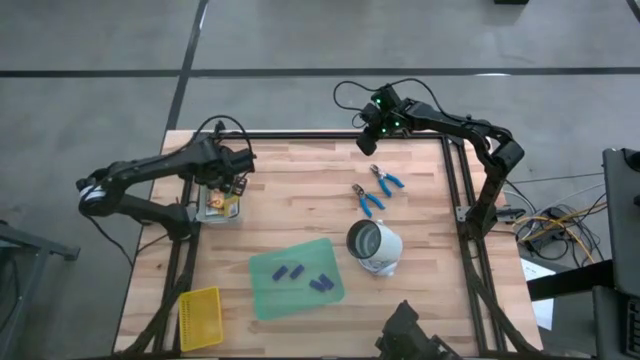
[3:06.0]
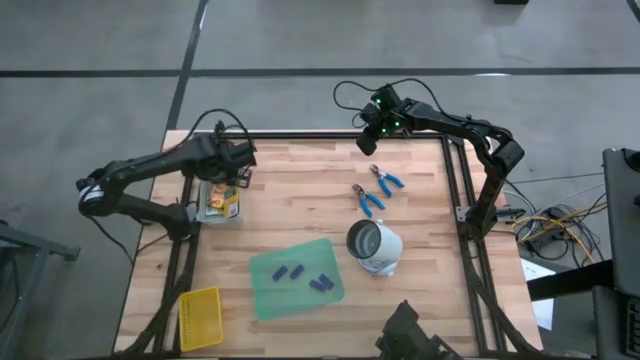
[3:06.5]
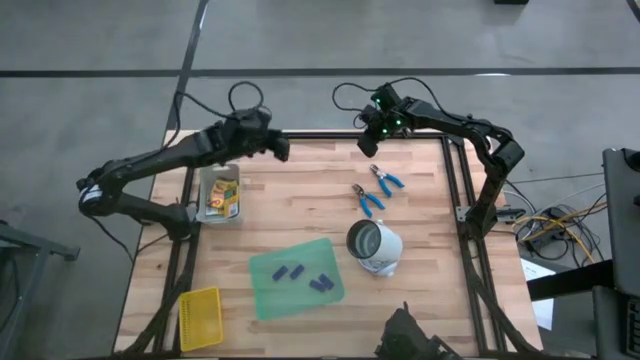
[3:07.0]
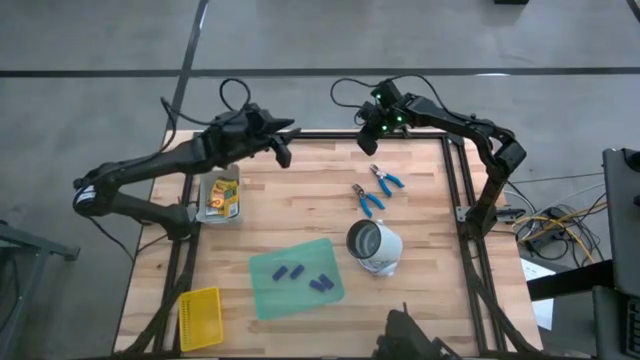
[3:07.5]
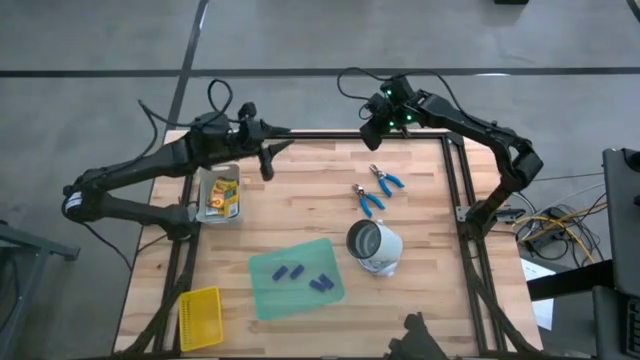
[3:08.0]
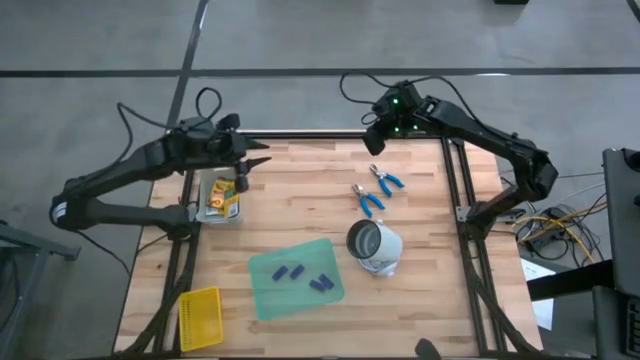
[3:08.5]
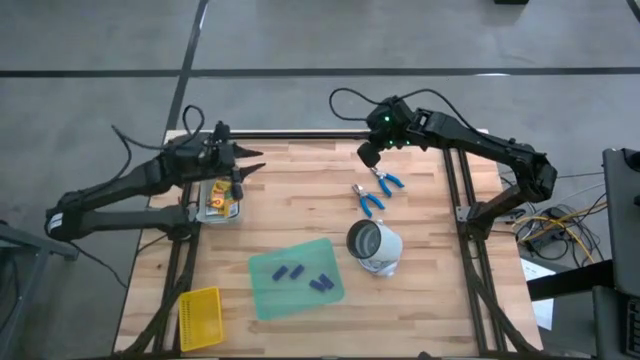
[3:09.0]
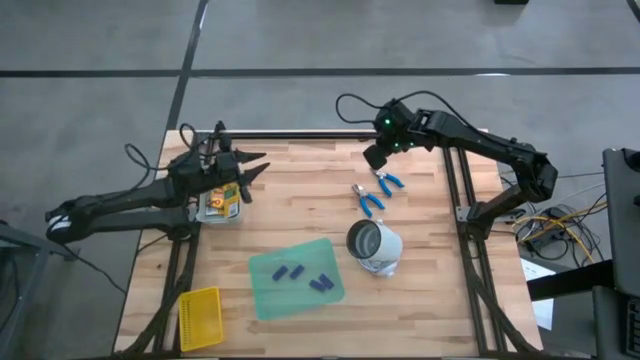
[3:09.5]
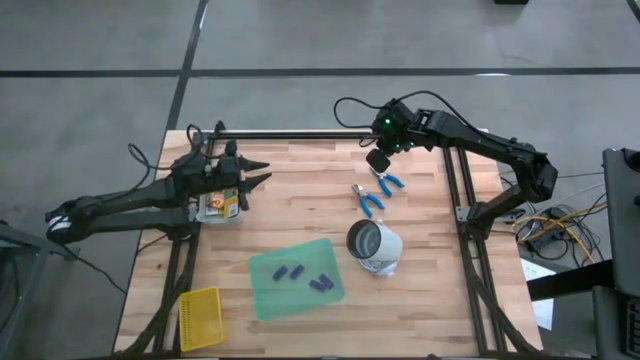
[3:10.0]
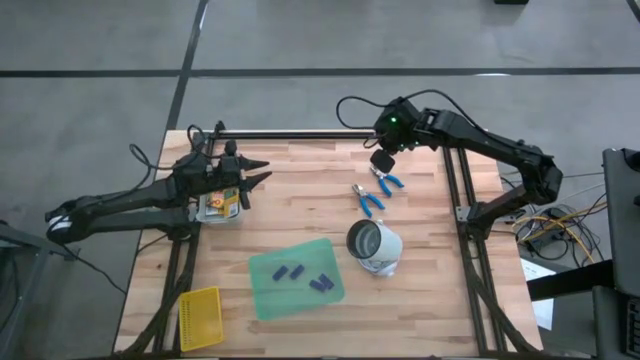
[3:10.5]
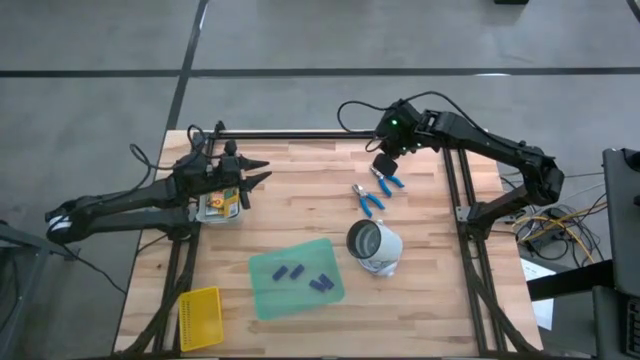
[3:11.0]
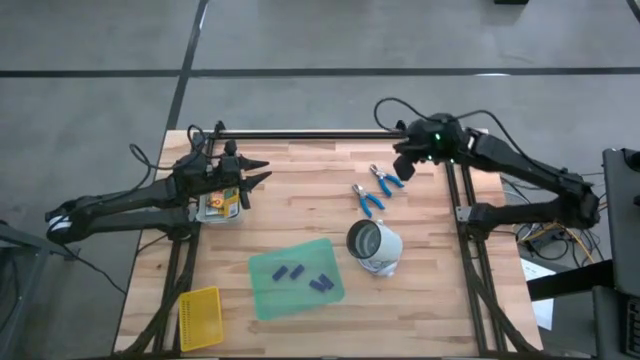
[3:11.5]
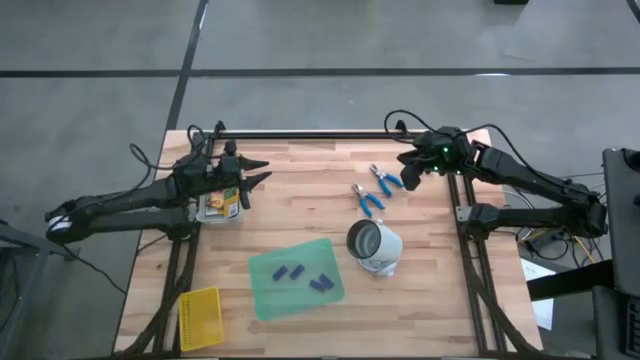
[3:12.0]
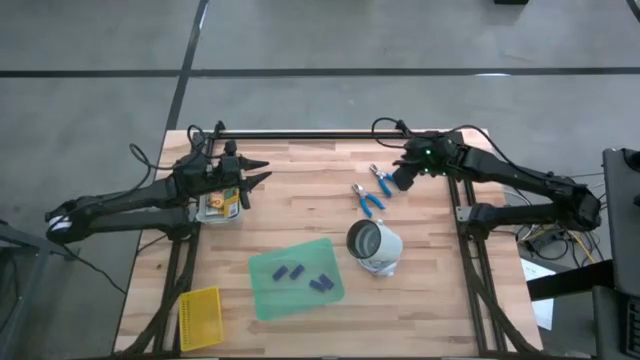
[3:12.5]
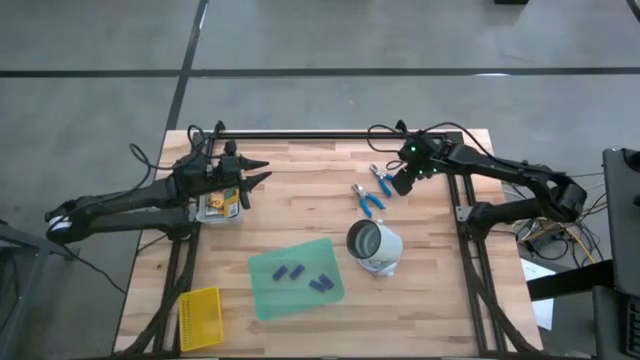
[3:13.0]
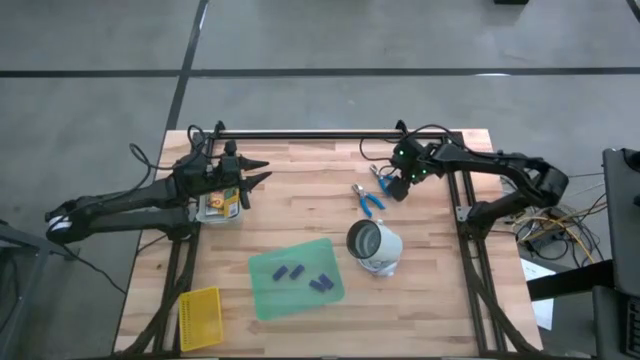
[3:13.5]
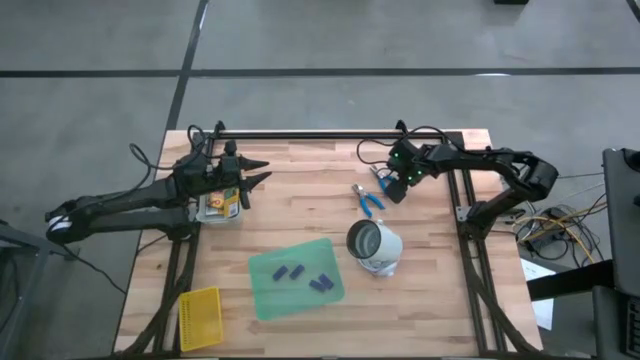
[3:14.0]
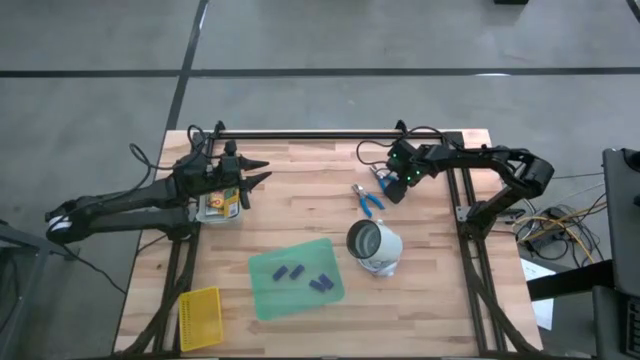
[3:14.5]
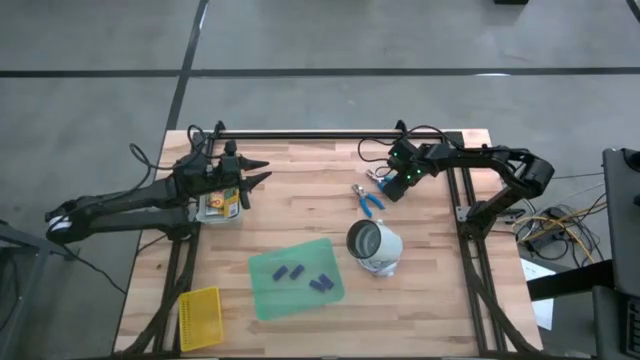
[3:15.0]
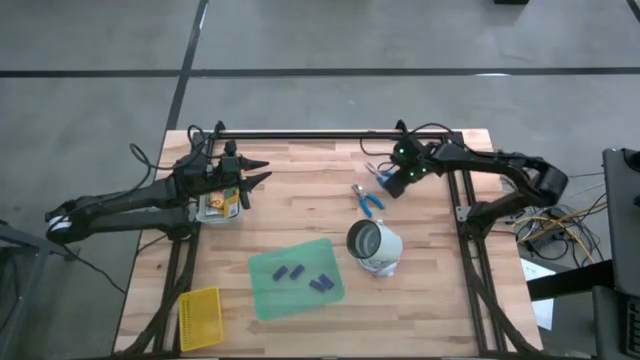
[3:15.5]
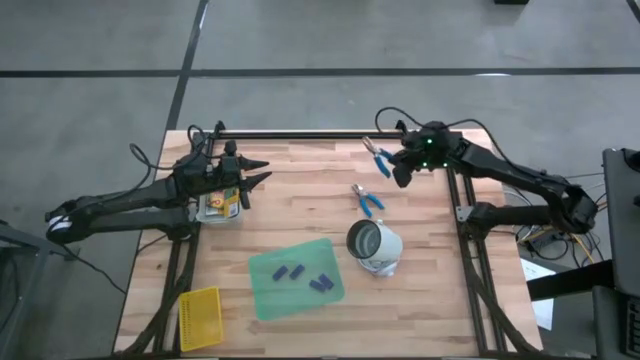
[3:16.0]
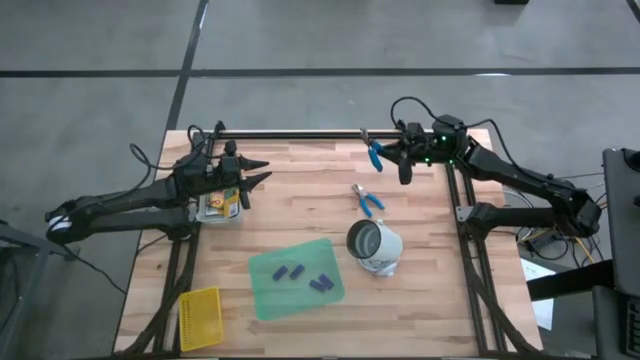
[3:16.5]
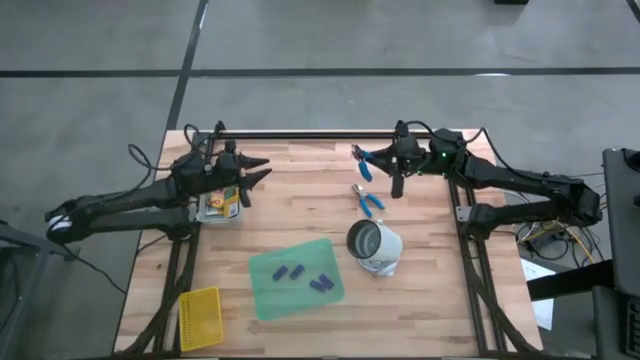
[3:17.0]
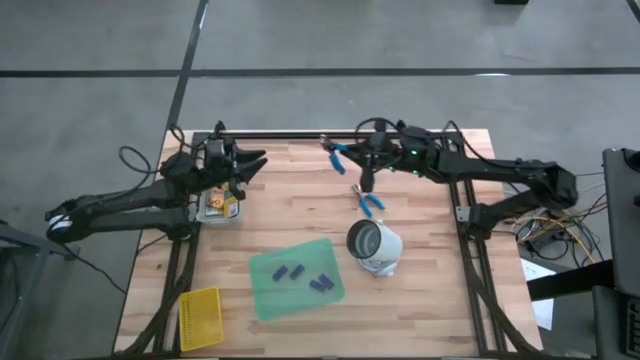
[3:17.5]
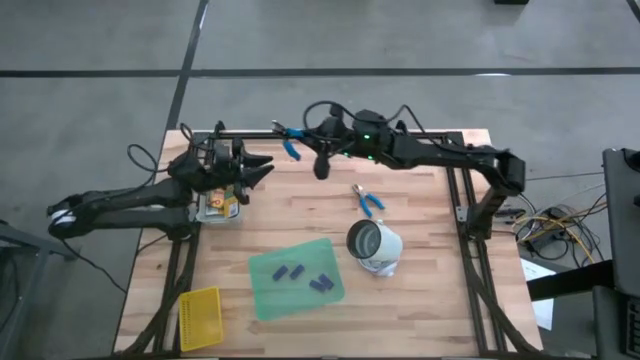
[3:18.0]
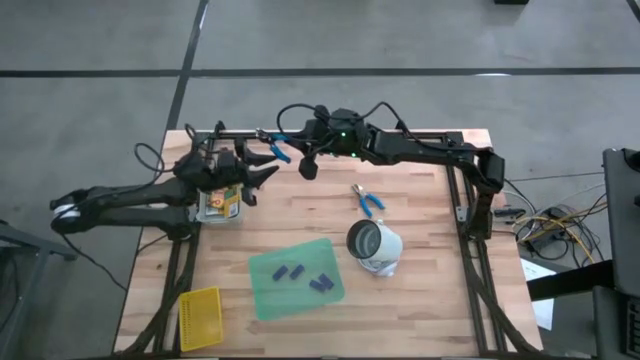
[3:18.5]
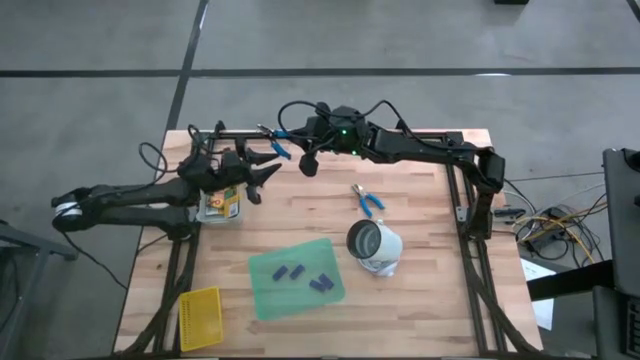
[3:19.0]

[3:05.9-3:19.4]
Task: Pick & Place School Supplies
Put the blue hole puncher into the yellow bin

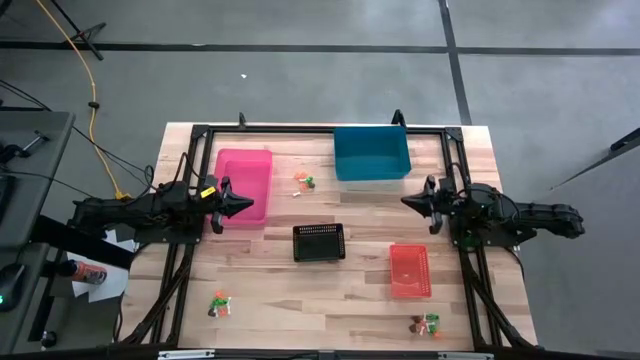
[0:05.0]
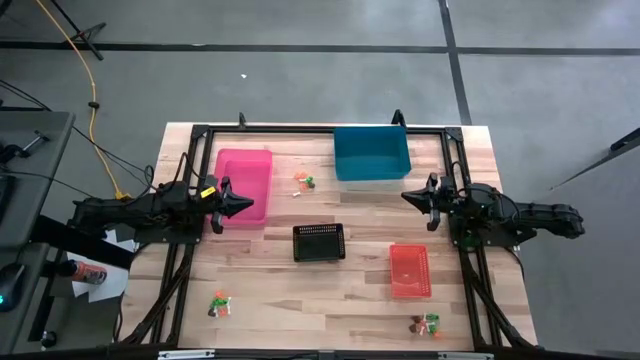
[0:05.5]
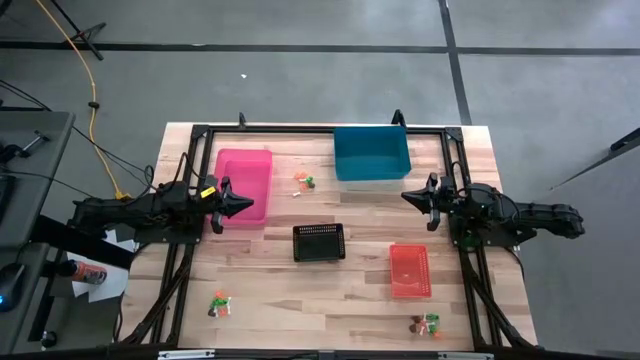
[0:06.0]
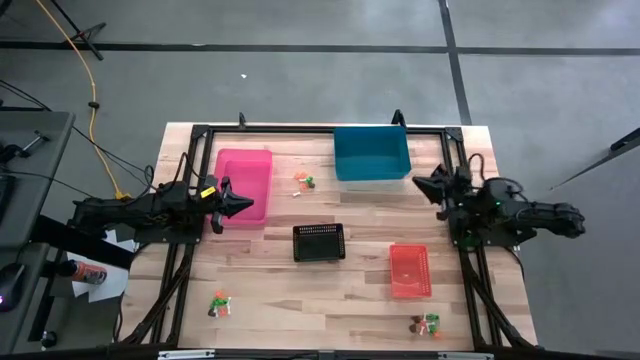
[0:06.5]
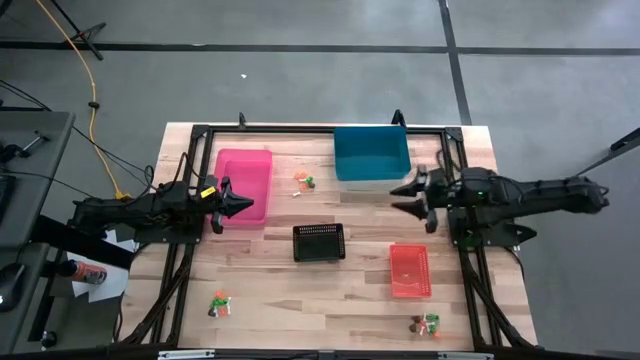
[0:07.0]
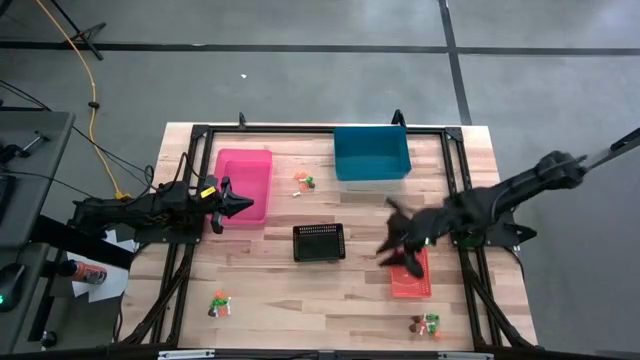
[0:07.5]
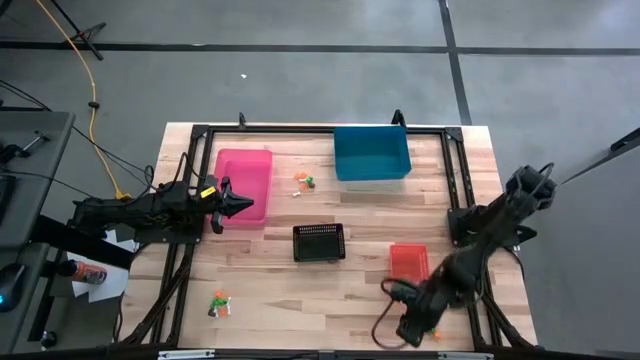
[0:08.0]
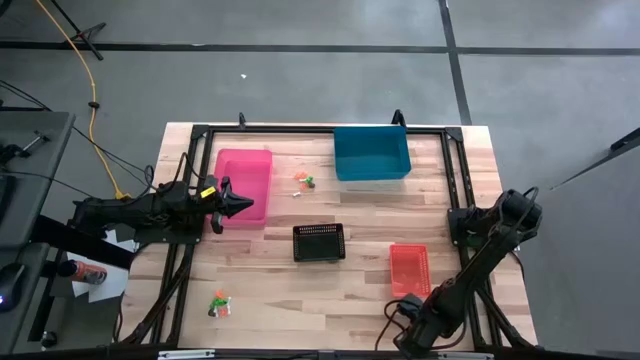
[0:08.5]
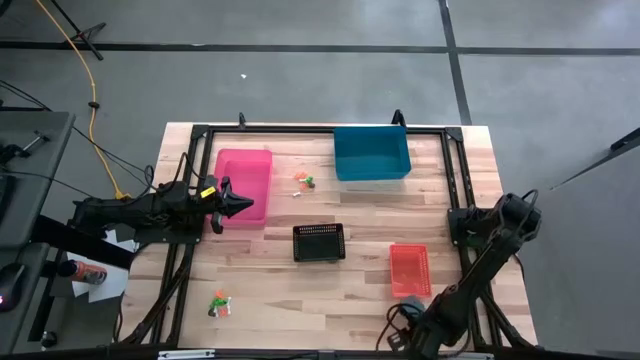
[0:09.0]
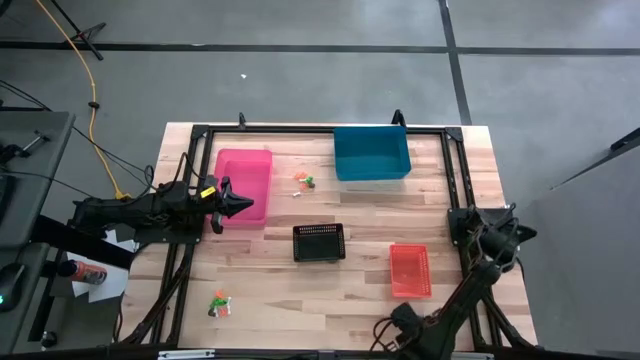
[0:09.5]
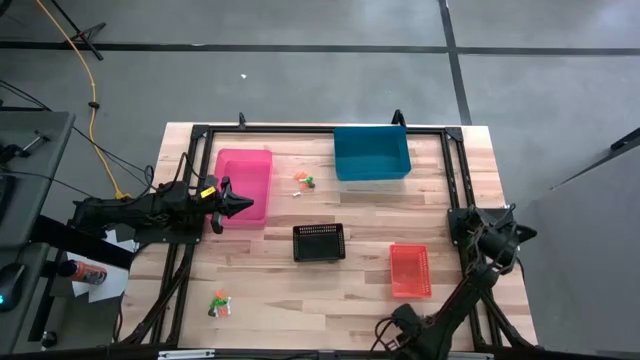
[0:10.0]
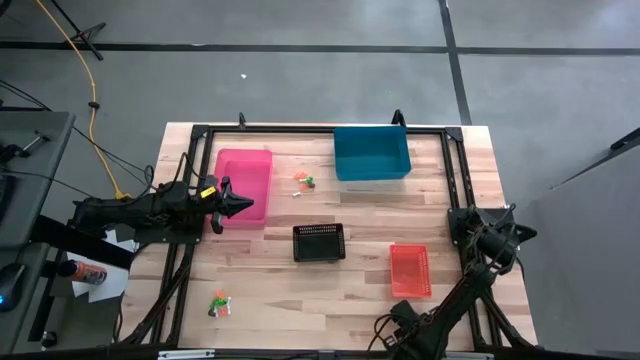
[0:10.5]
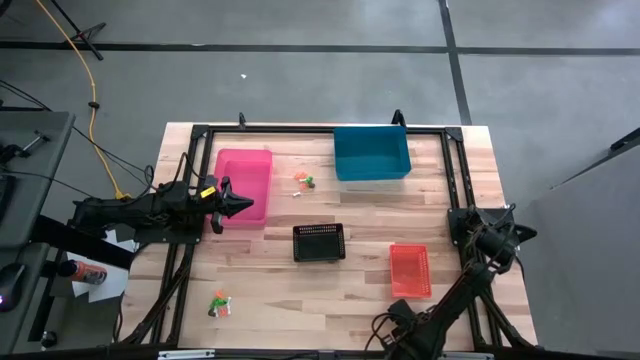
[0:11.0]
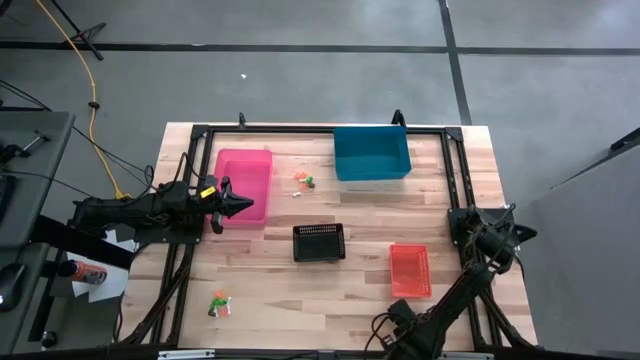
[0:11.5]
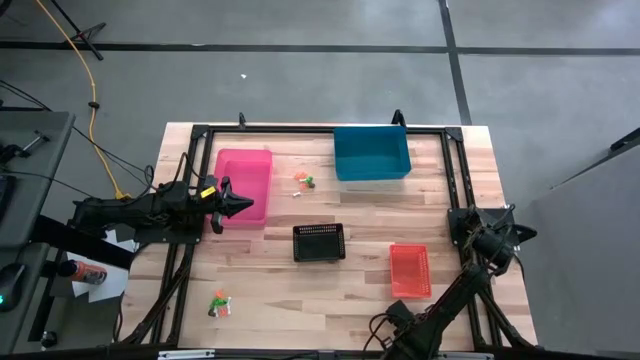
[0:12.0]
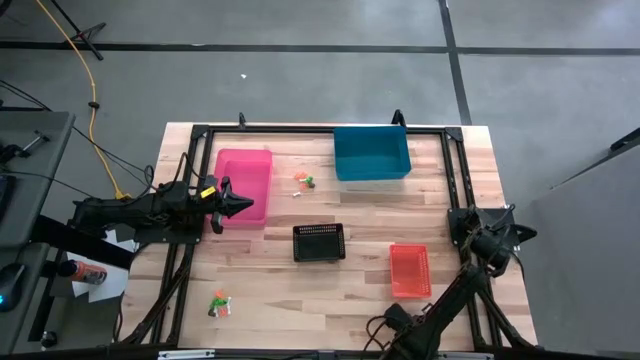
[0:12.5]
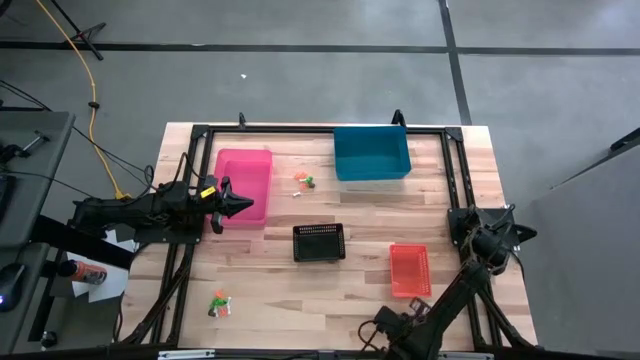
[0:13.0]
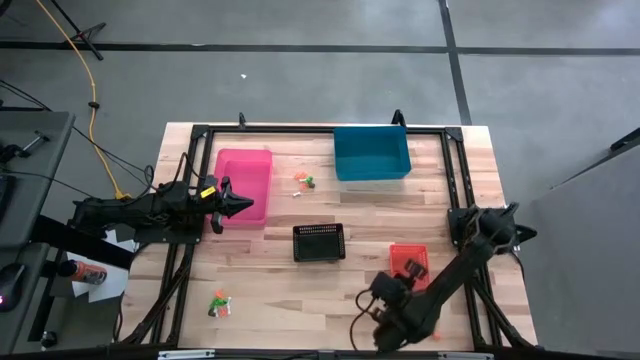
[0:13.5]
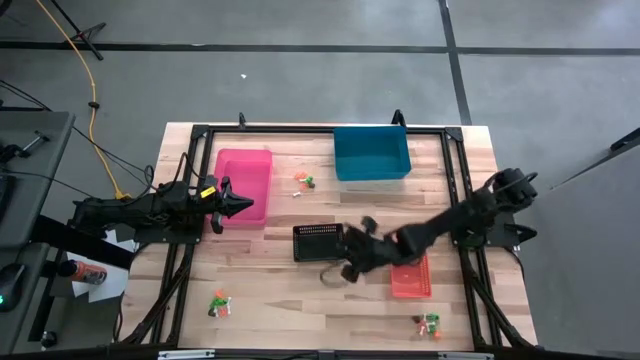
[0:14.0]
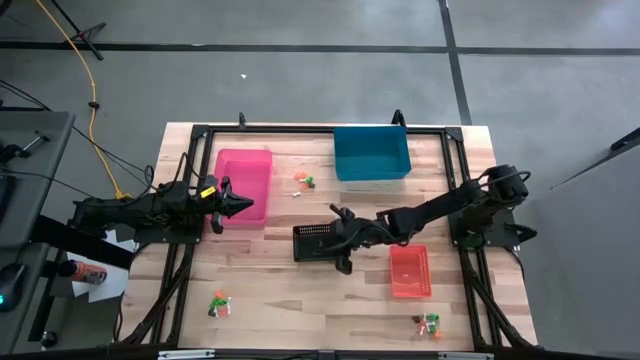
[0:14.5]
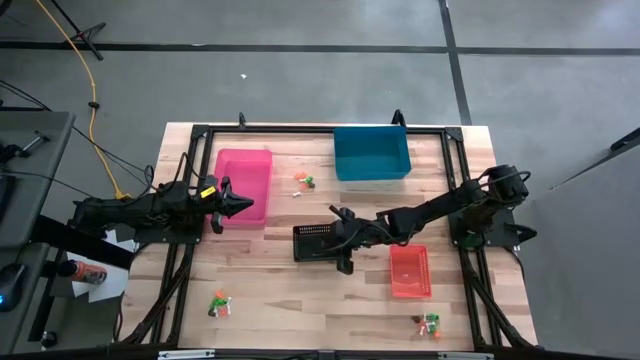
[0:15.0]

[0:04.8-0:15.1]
Task: Sort Halloween decoration
Put the black skull toy into the black bin
